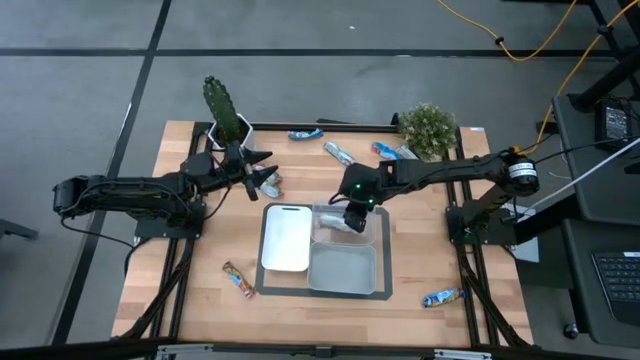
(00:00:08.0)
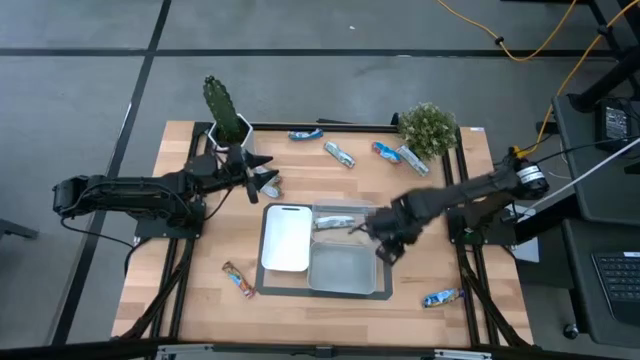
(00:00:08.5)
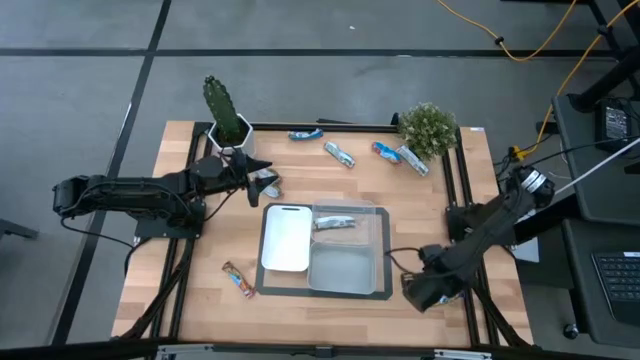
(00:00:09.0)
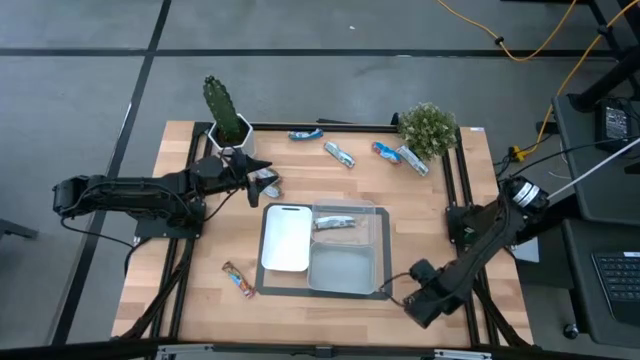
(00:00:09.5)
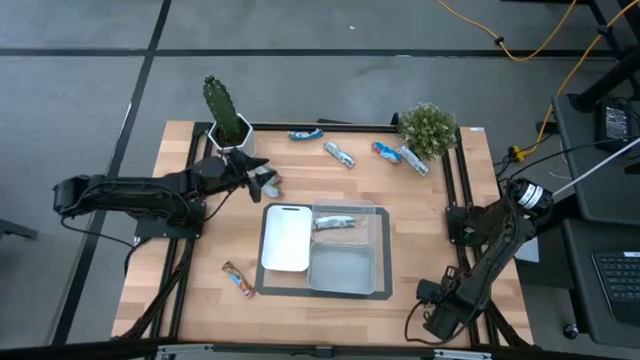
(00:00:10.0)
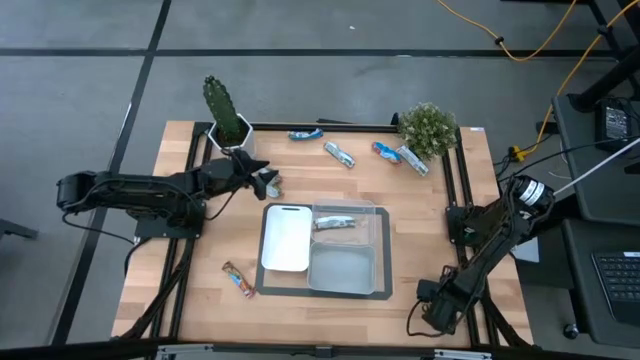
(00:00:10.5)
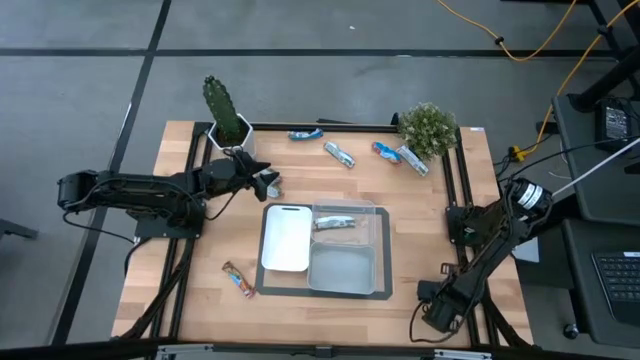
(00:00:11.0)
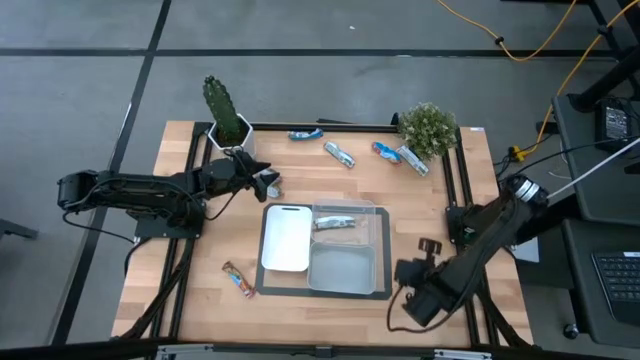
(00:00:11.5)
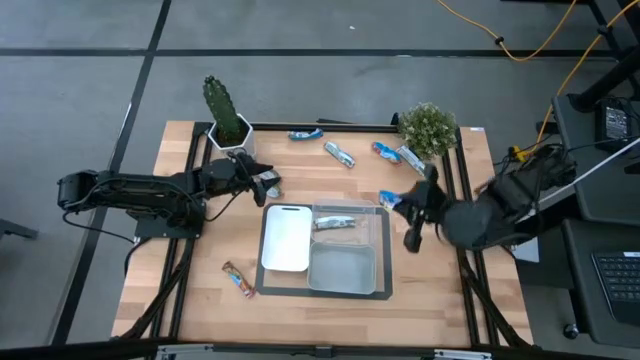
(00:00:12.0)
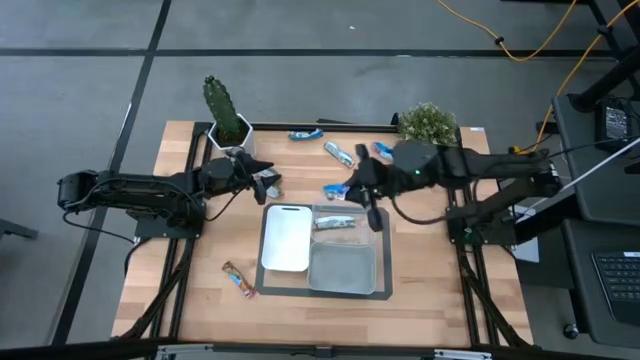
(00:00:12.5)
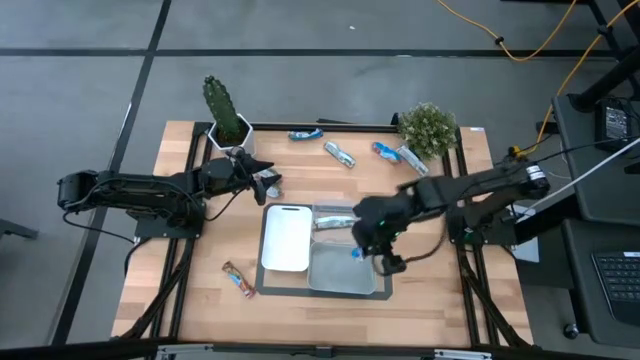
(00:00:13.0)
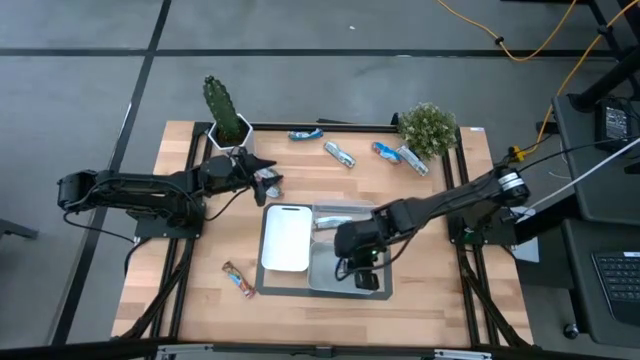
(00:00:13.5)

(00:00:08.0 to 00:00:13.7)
Task: Pick and place Granola Bars by type
Put the blue granola bar into the gray bin

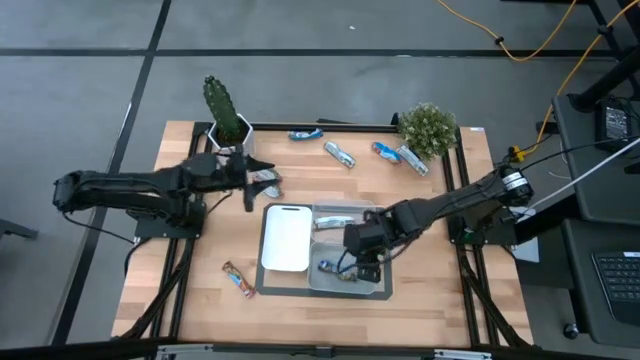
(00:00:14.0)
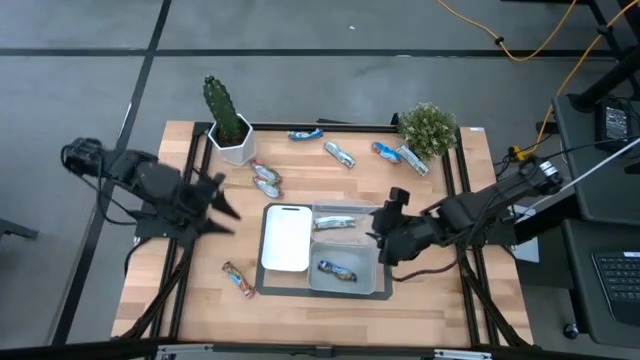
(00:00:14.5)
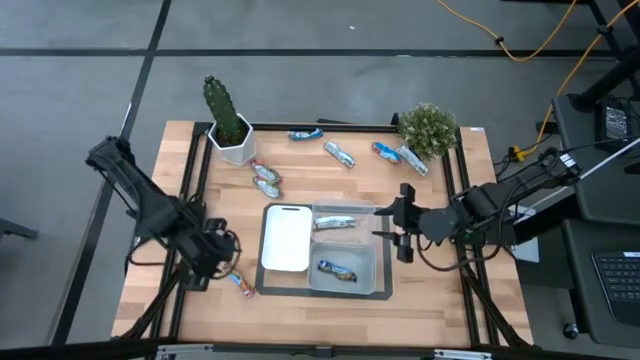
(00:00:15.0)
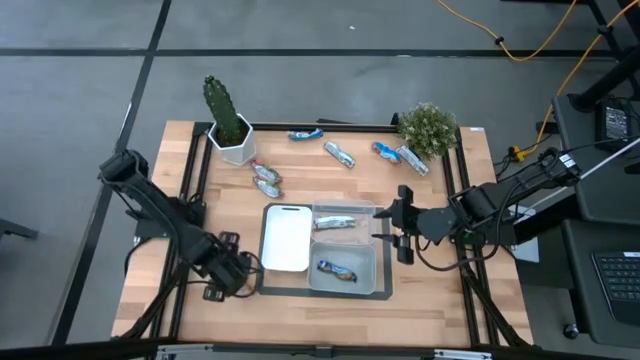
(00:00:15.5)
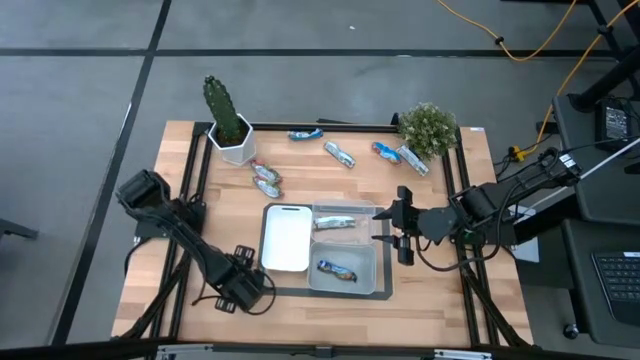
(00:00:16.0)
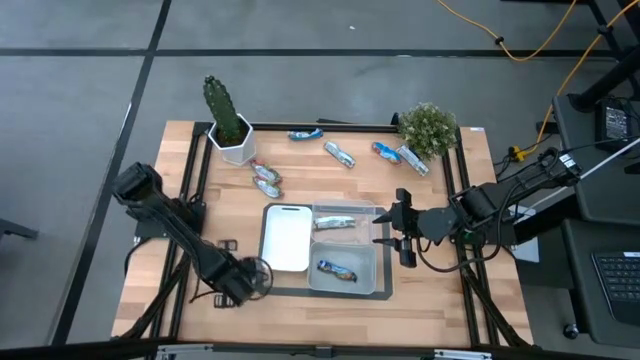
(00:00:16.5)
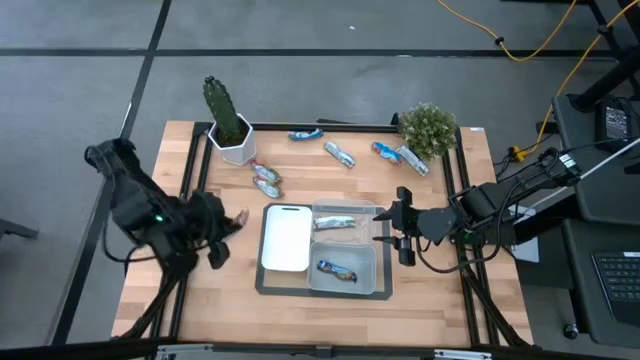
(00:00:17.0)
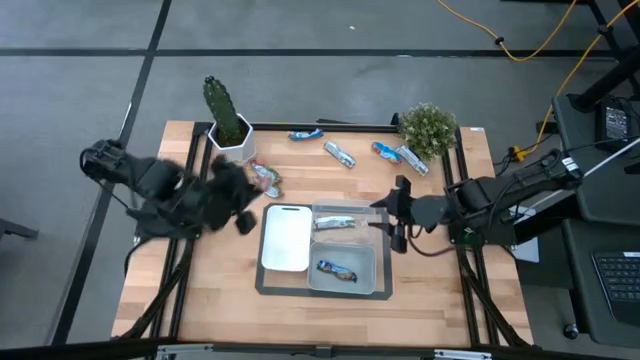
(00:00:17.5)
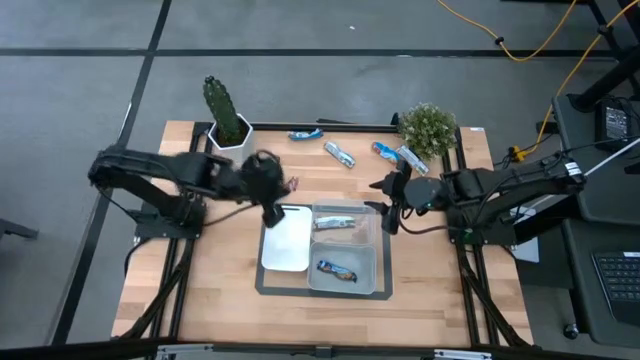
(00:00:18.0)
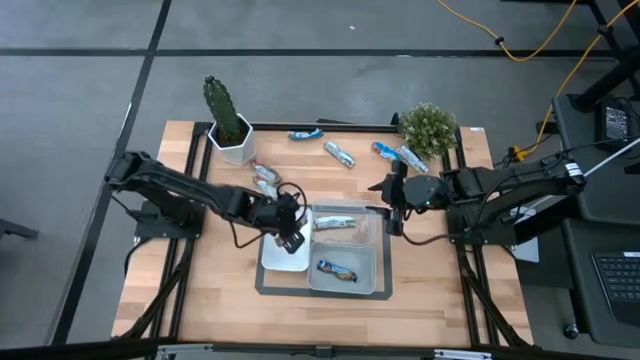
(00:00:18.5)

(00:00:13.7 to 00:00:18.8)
Put the red granola bar into the white bin

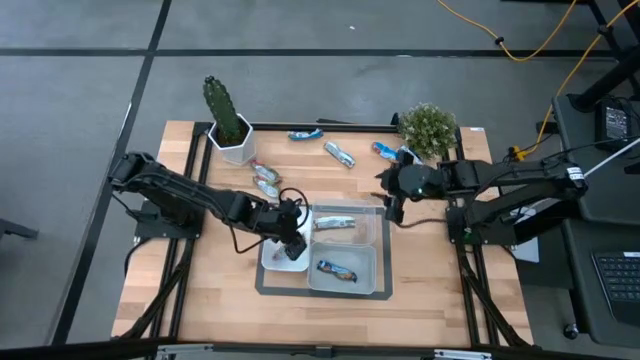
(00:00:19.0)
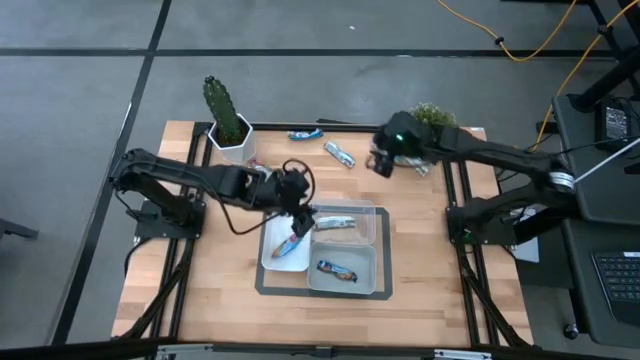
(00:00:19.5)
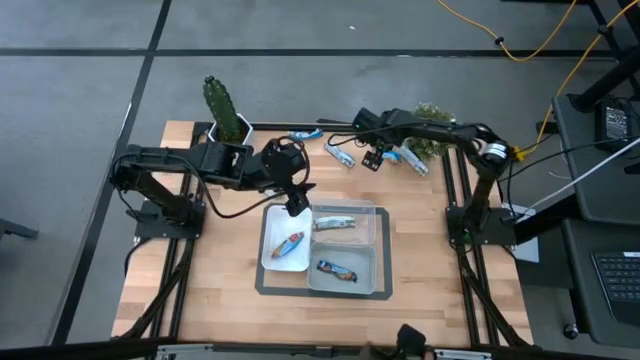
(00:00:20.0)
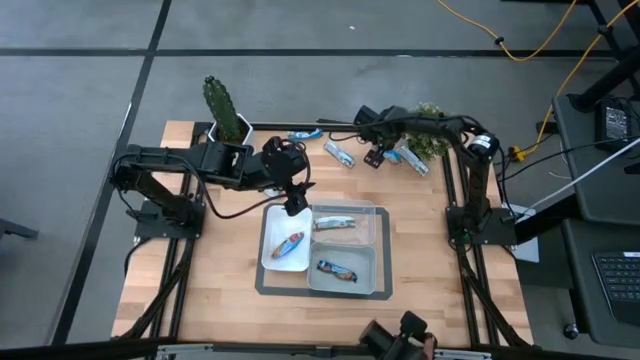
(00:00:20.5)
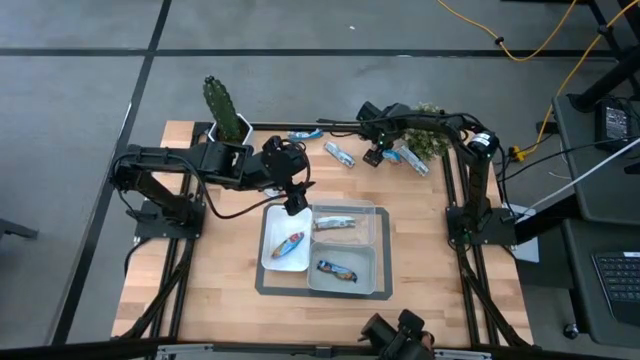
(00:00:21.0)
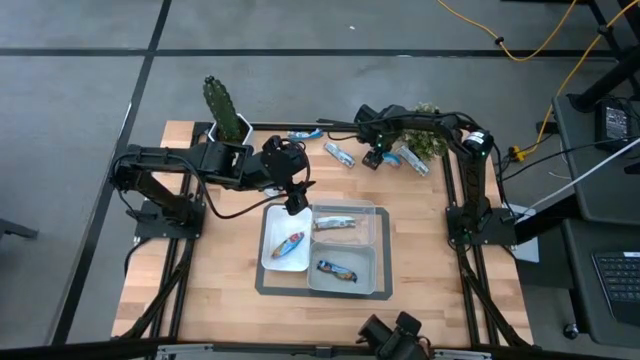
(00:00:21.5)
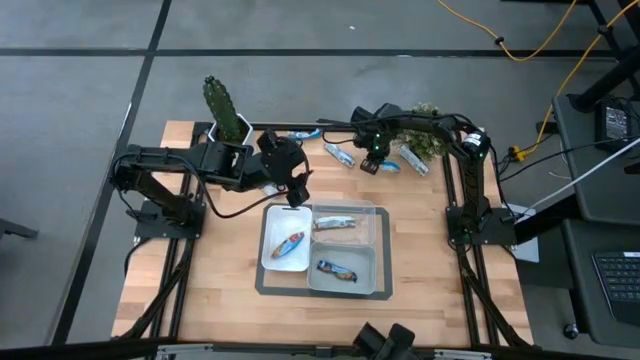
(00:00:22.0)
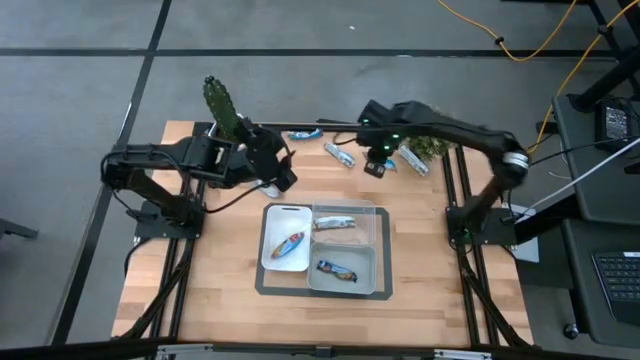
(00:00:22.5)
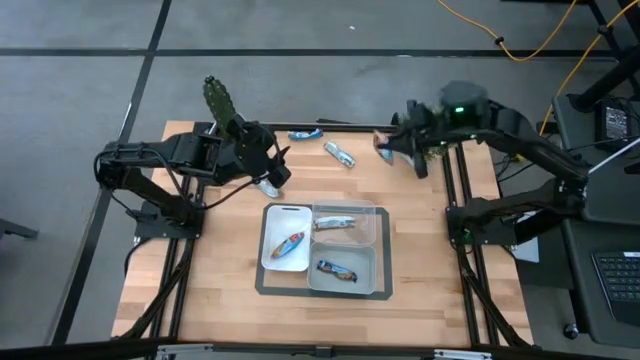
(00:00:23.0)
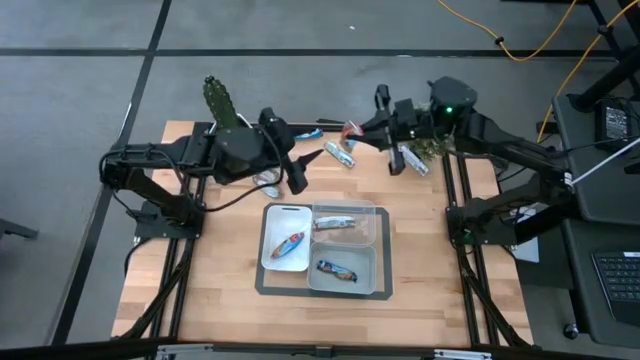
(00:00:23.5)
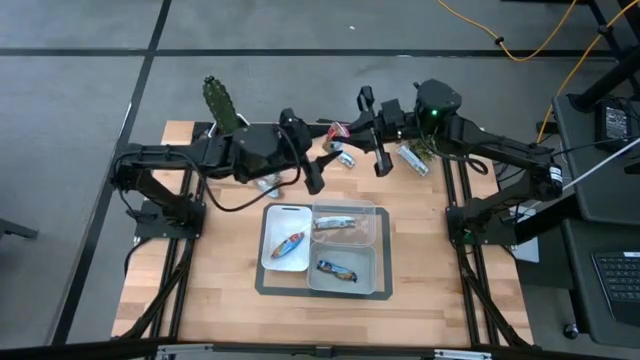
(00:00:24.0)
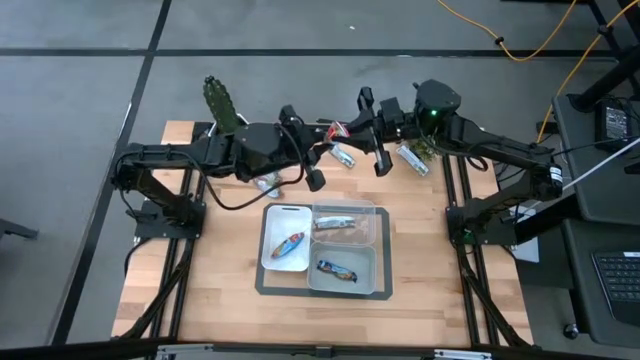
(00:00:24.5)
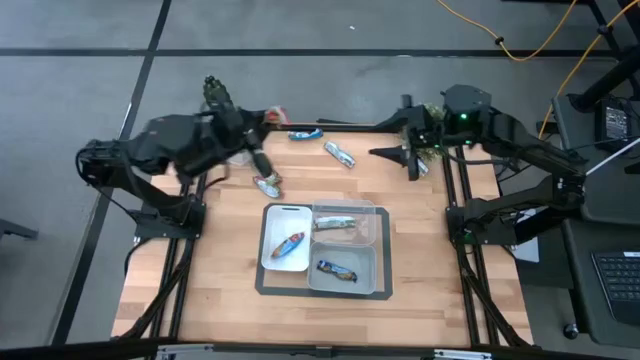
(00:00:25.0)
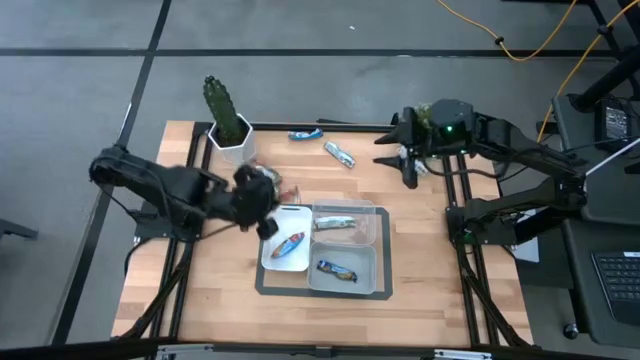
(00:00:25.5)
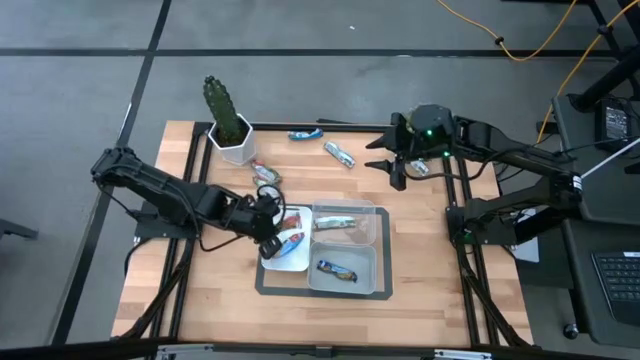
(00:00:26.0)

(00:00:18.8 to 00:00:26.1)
Put the red granola bar into the white bin

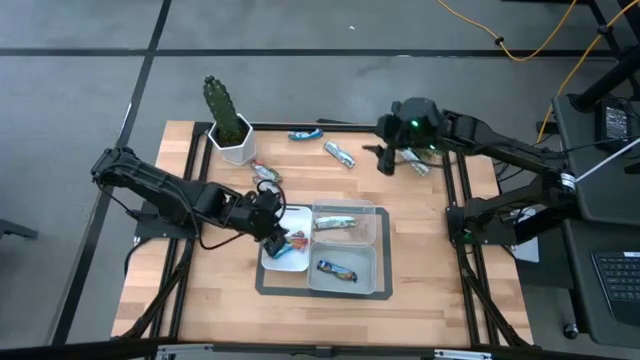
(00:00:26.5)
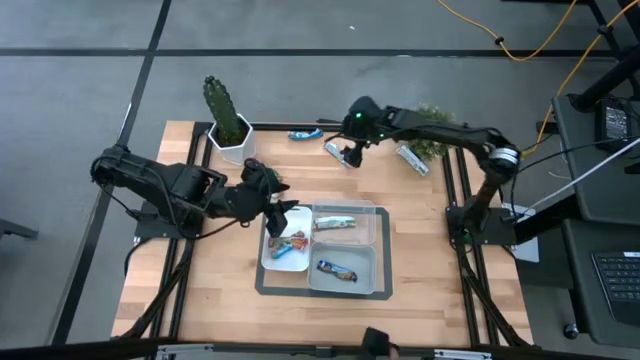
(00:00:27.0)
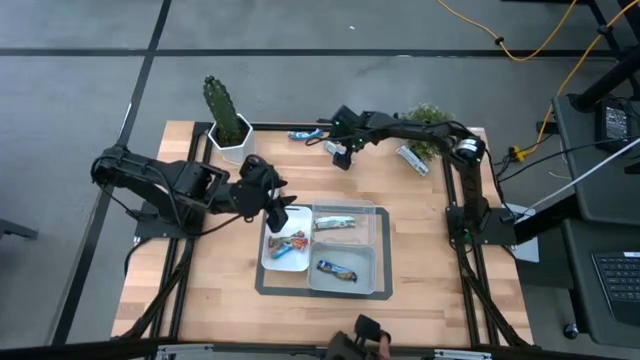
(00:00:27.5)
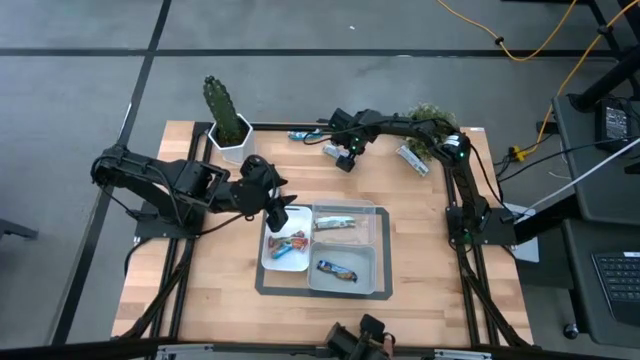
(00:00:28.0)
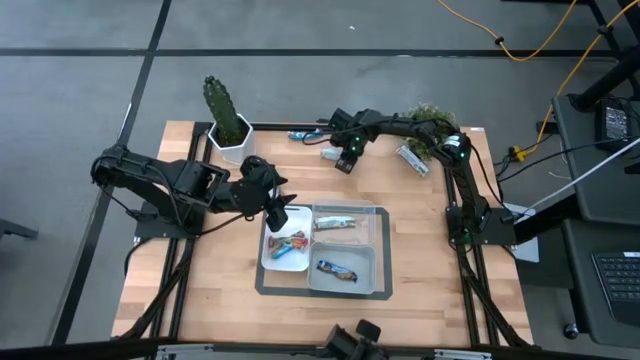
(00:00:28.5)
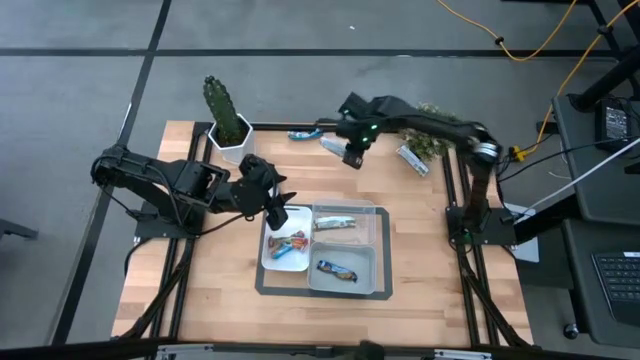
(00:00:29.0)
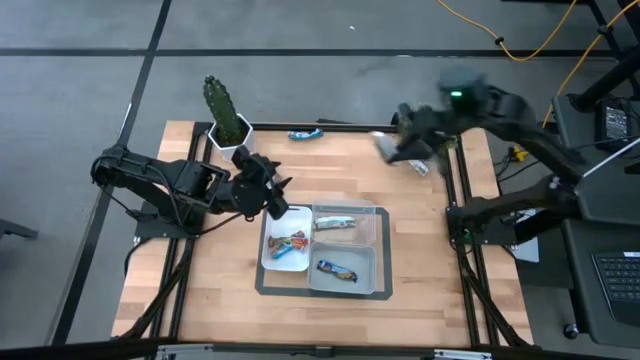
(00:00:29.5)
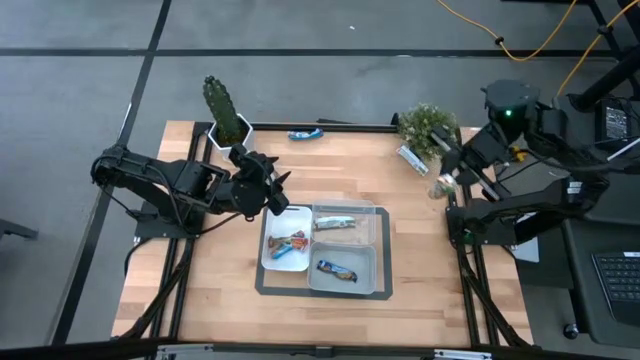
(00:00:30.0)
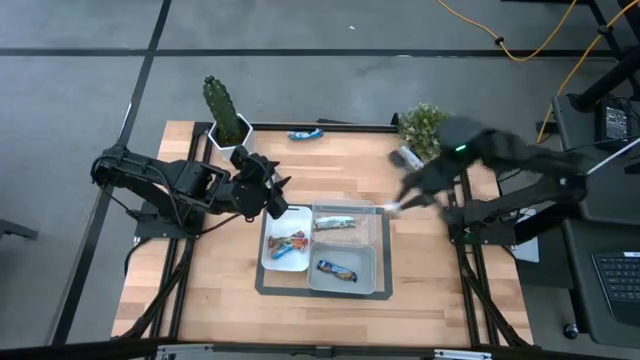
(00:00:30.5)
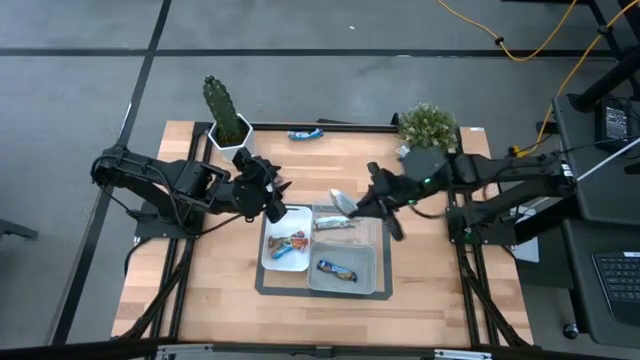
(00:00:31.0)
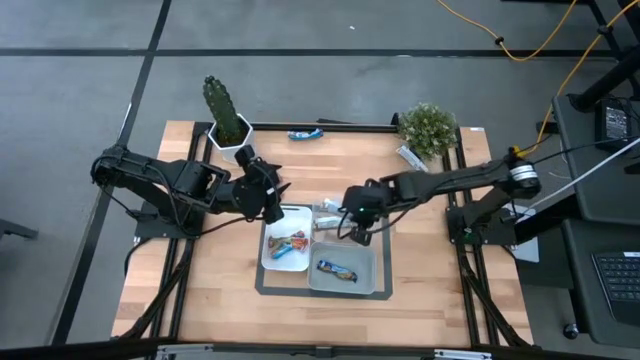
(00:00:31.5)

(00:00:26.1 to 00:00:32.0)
Put the yellow granola bar into the transparent bin
